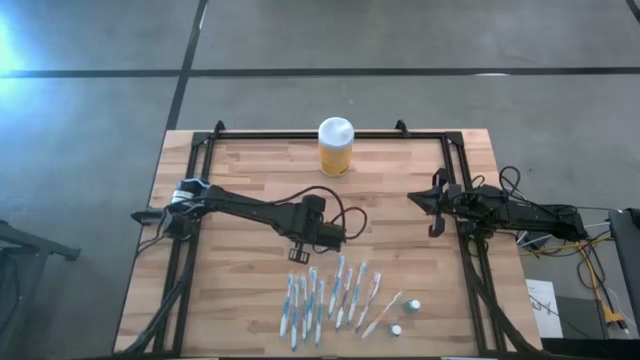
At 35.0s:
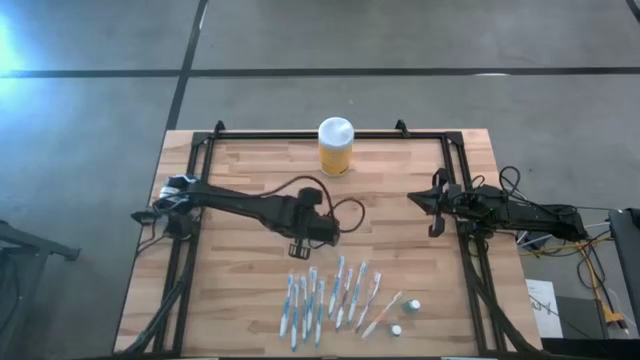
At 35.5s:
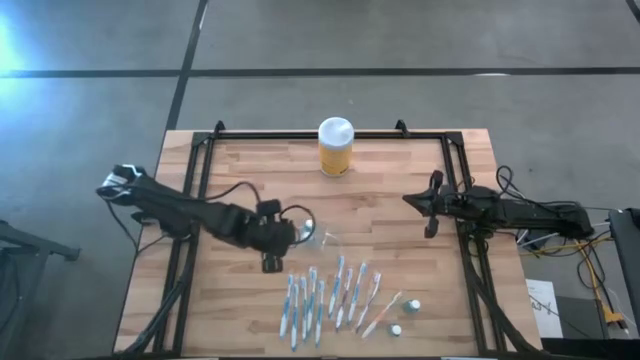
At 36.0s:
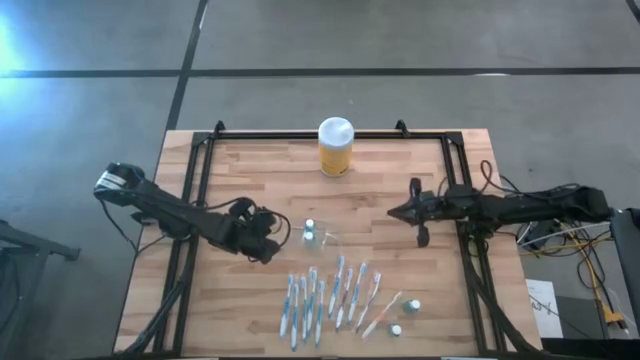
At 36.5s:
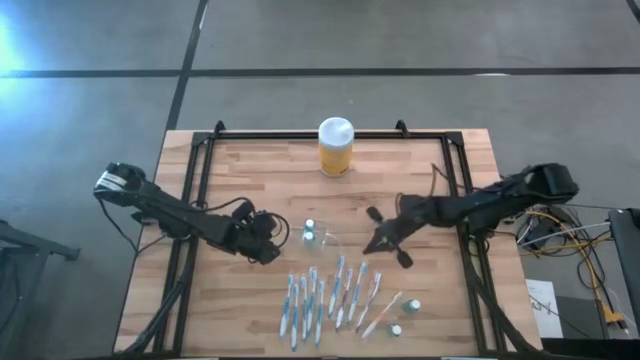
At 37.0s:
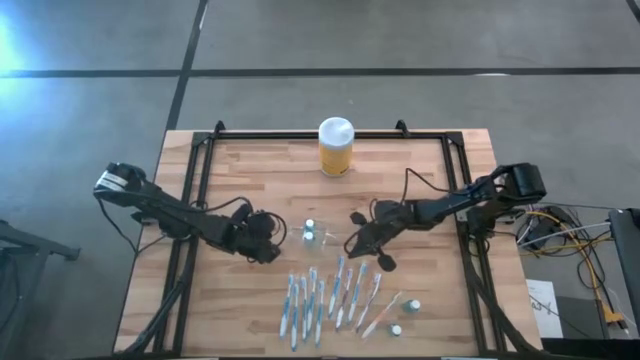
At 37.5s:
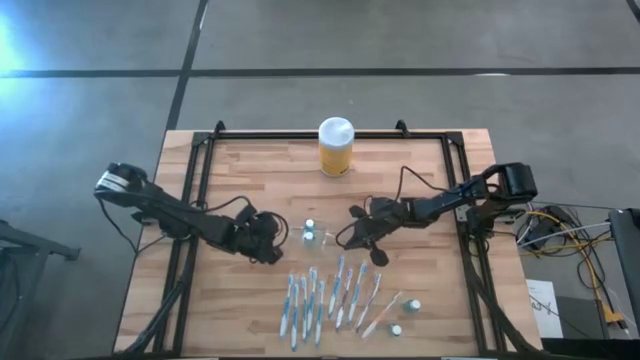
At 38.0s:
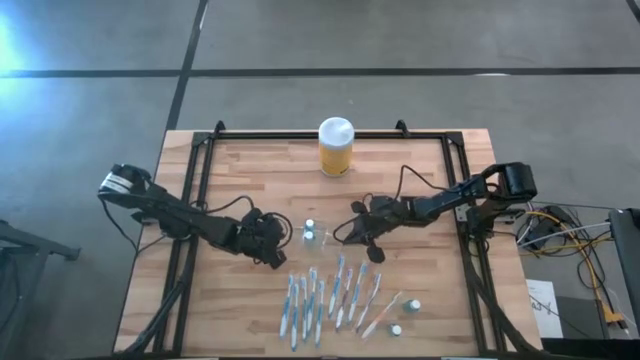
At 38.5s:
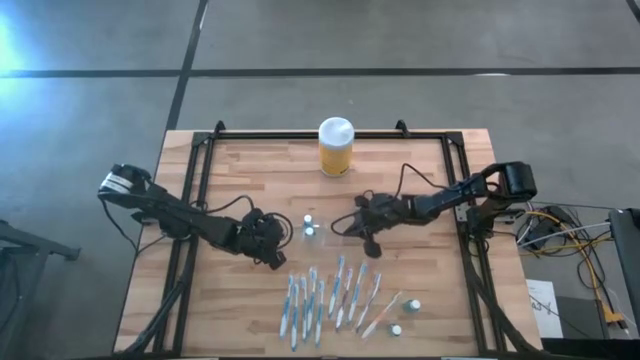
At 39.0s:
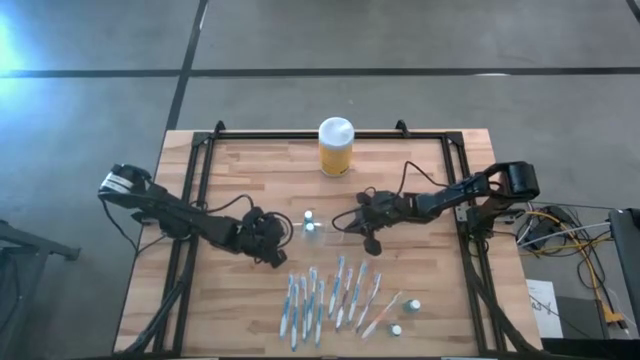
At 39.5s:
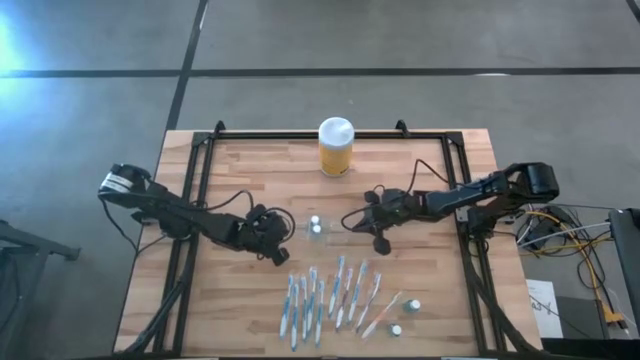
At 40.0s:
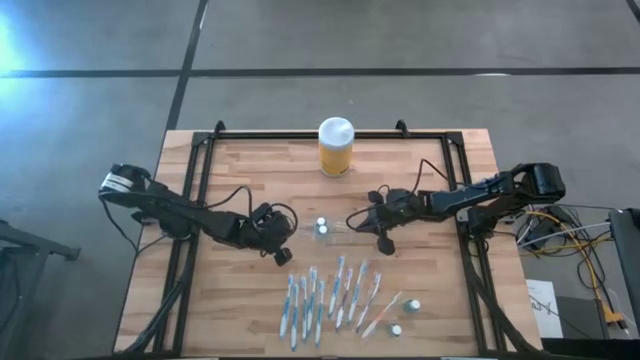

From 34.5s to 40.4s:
Task: Pick & Place toothbrushing station
Adjust the transparent organizer

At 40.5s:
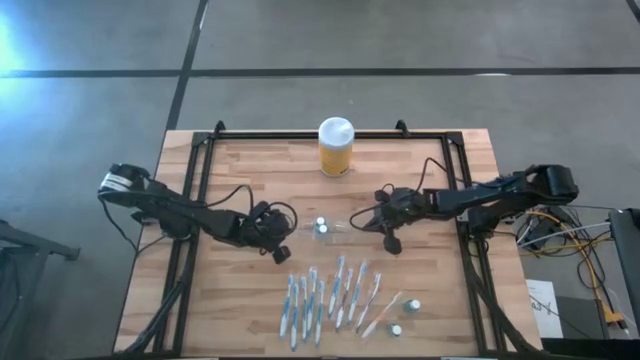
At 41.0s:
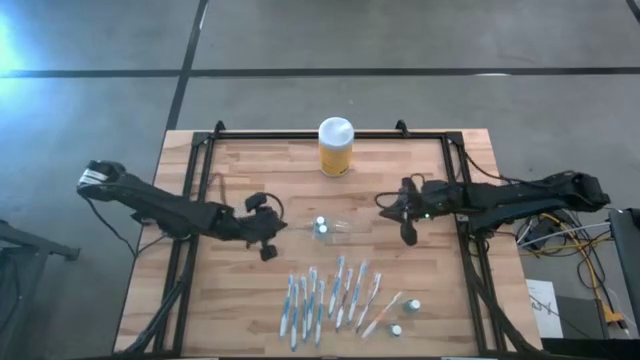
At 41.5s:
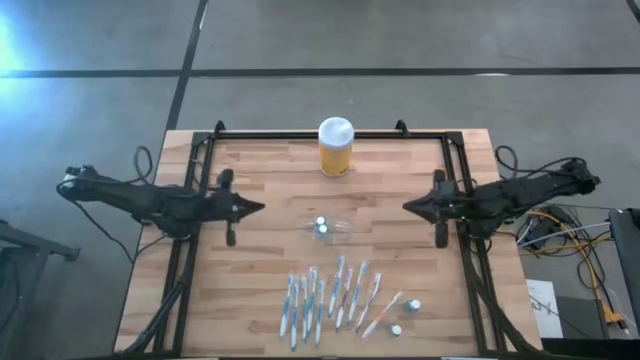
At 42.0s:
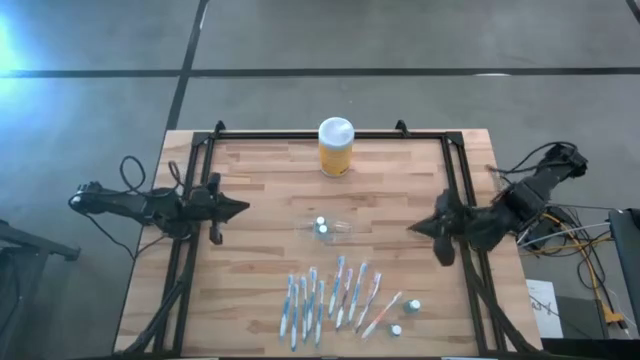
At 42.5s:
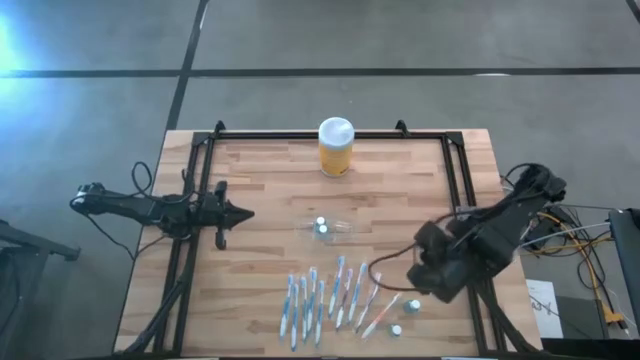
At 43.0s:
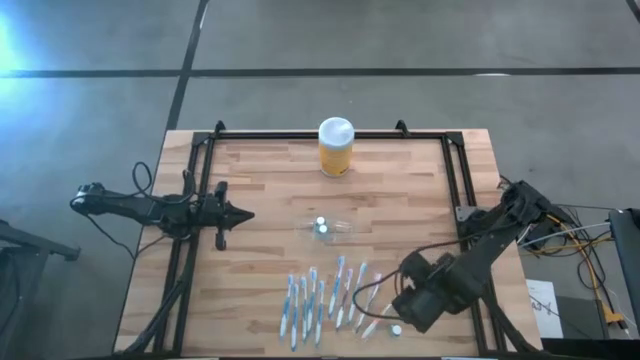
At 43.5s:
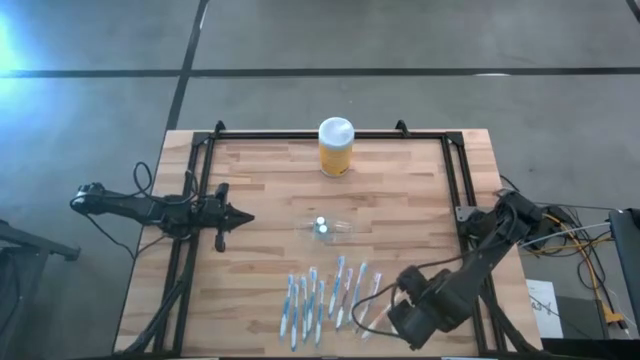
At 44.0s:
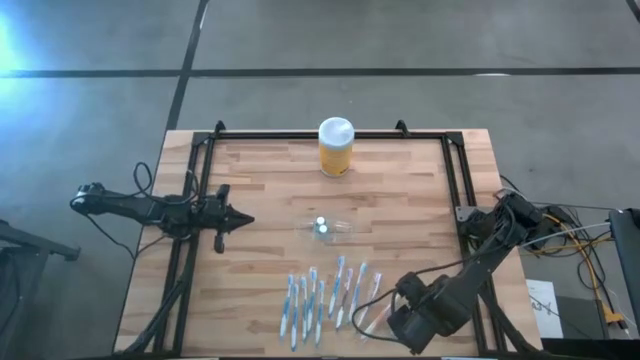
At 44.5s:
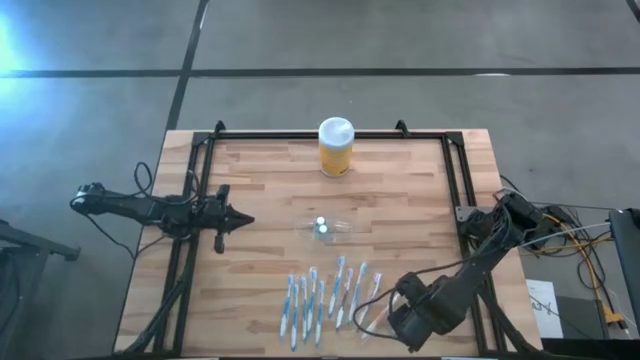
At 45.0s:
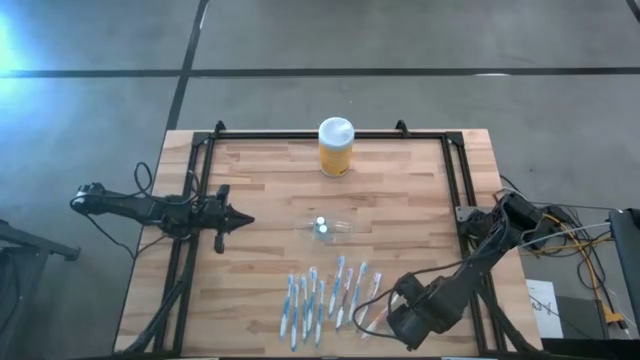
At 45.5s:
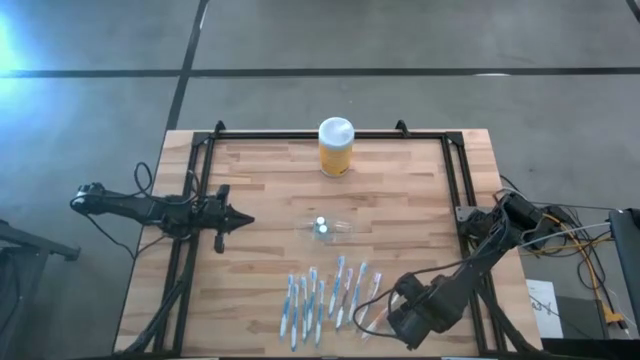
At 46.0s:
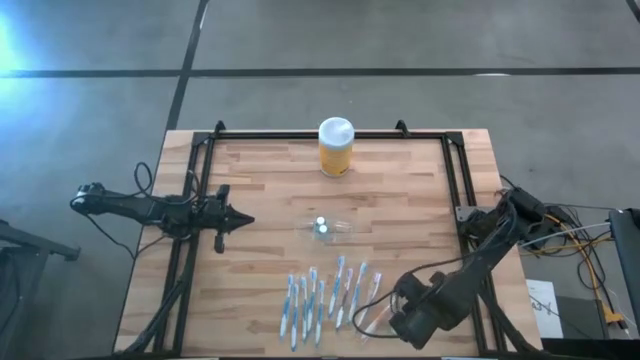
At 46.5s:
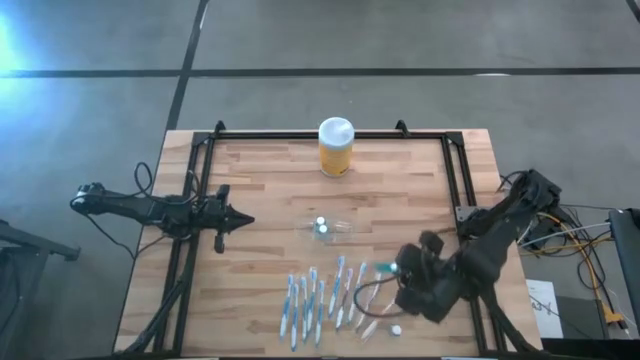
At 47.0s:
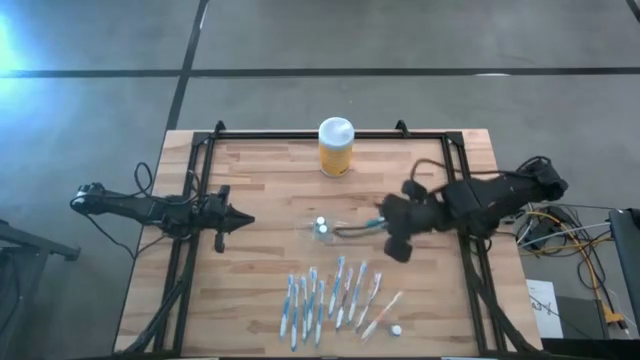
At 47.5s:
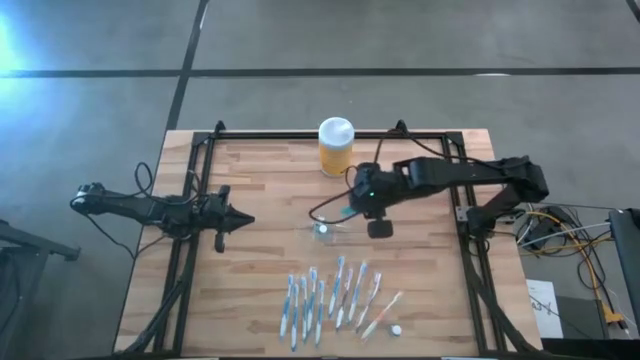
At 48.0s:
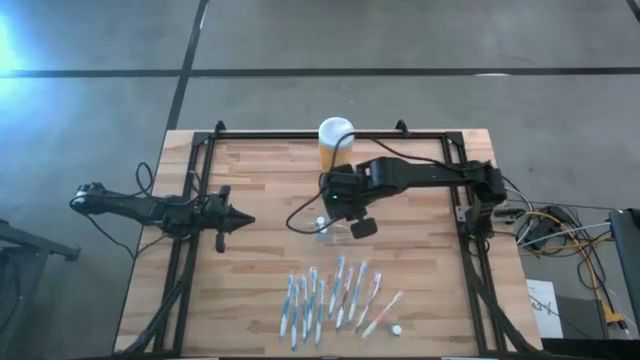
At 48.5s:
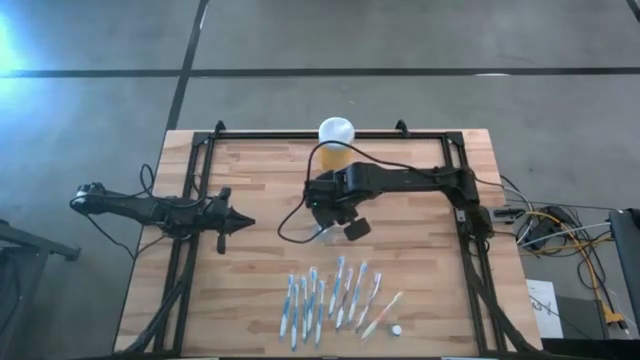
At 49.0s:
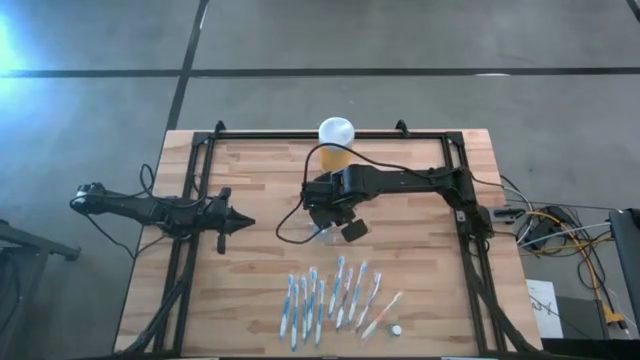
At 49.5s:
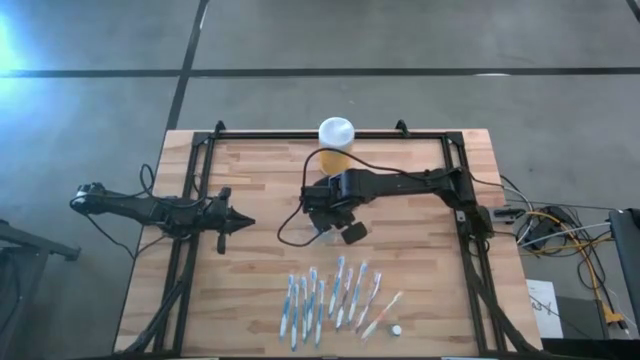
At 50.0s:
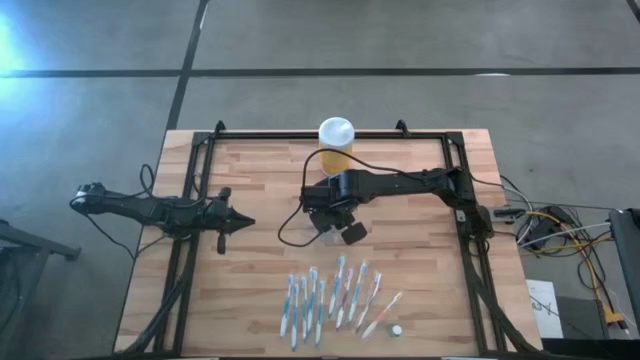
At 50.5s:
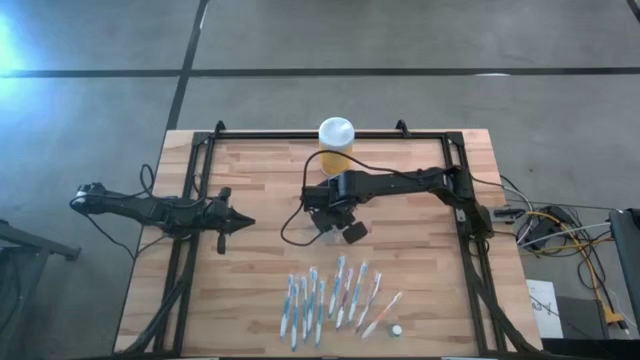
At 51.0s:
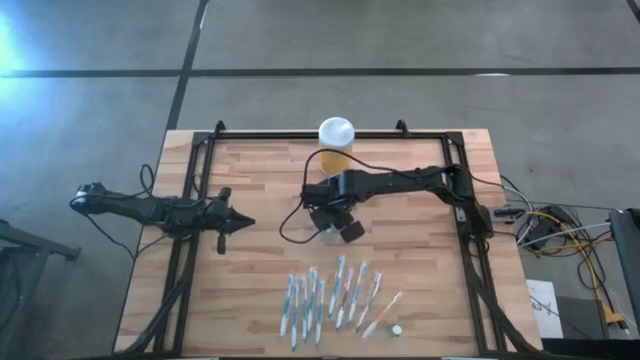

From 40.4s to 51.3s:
Put the blue mouthwash into the transparent organizer

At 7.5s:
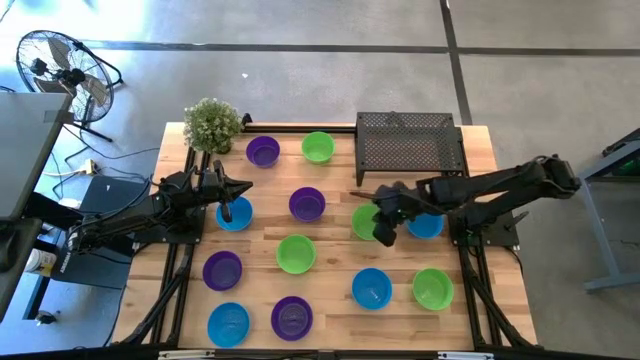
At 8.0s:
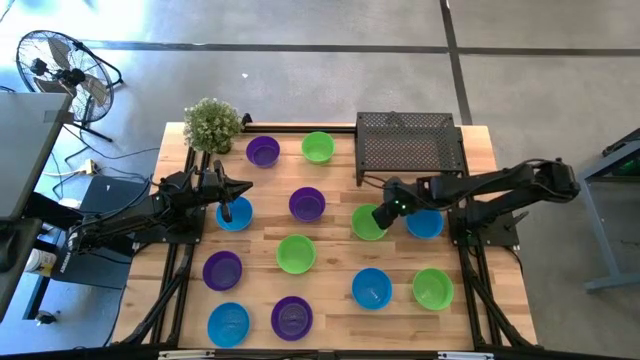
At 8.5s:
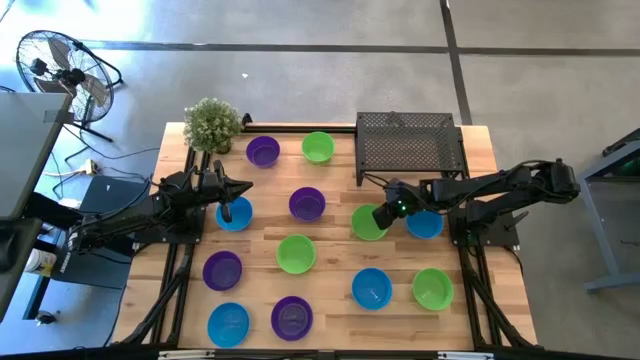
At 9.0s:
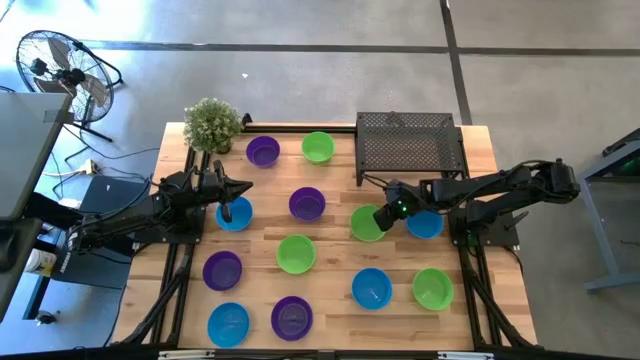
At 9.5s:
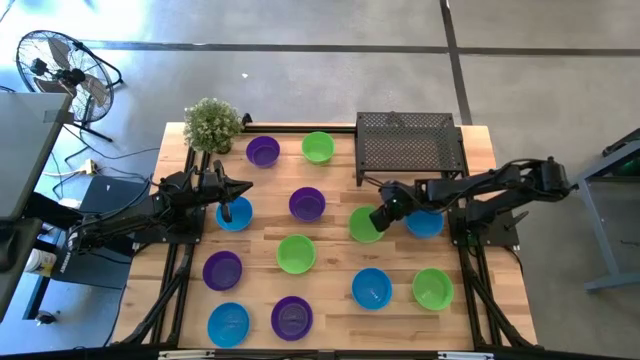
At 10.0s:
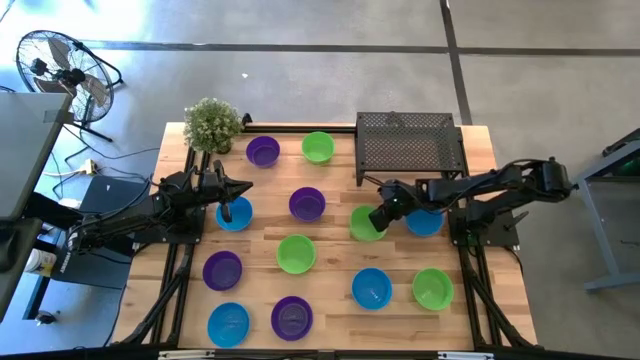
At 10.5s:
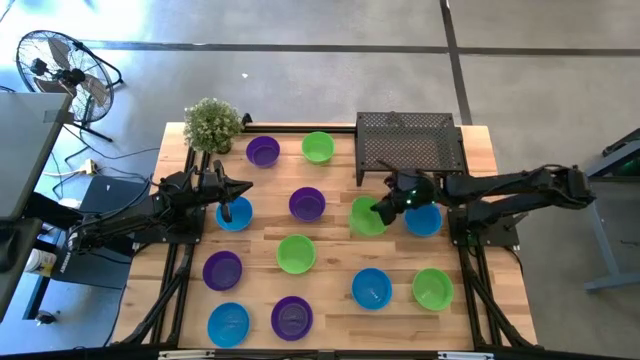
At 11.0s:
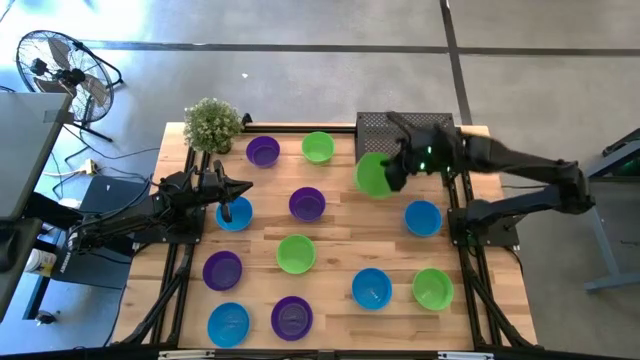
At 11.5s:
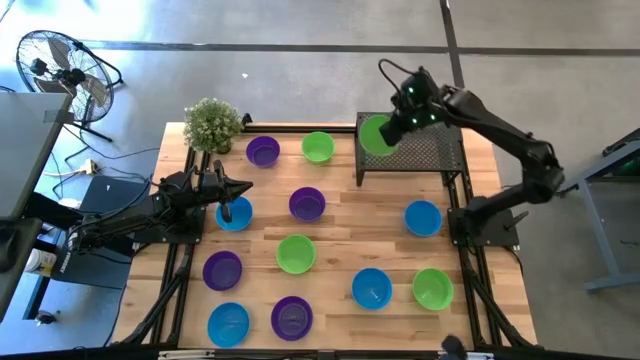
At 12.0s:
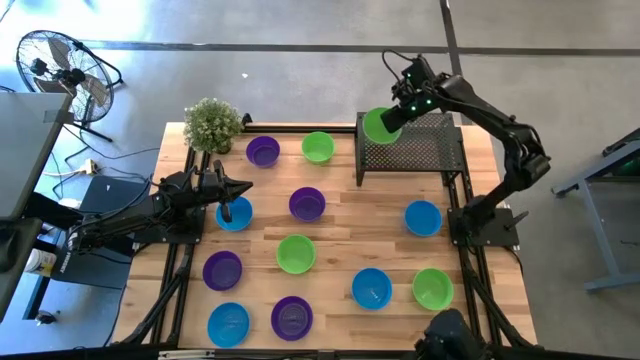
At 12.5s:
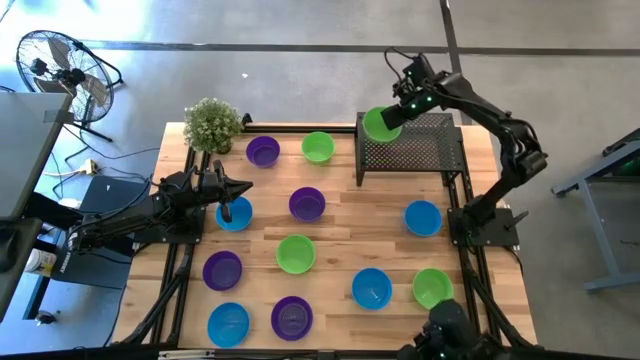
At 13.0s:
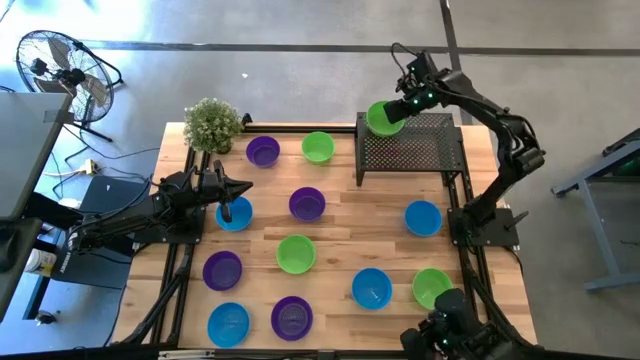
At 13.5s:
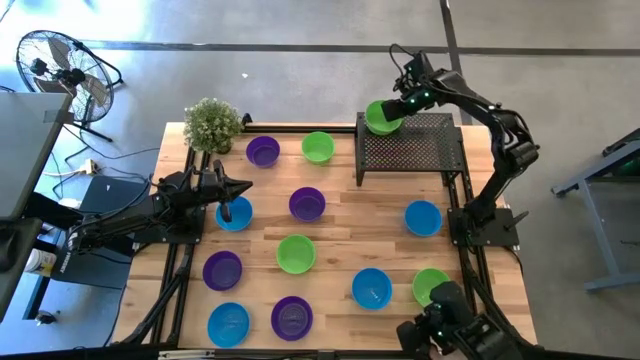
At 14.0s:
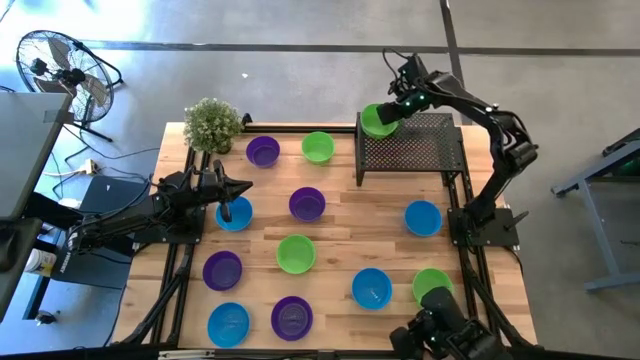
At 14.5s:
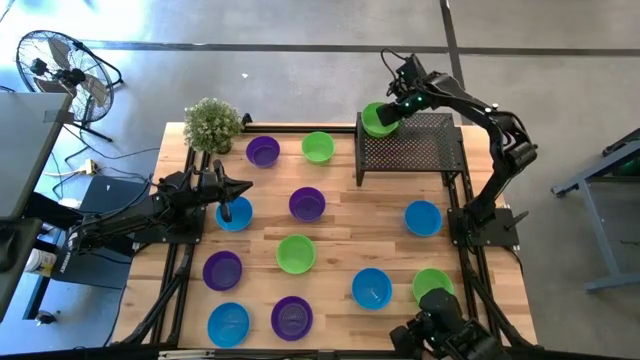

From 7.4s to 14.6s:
Task: Pick & Place Mini bowls
Put the green bowl on the shelf
